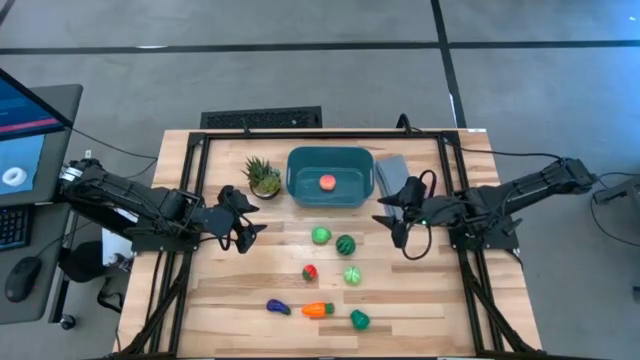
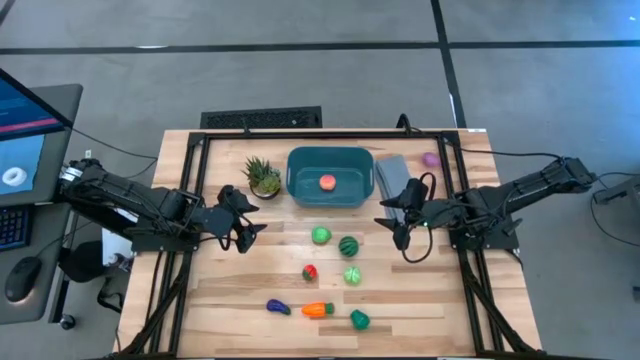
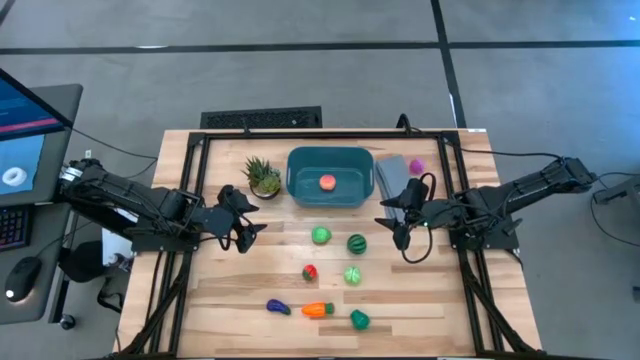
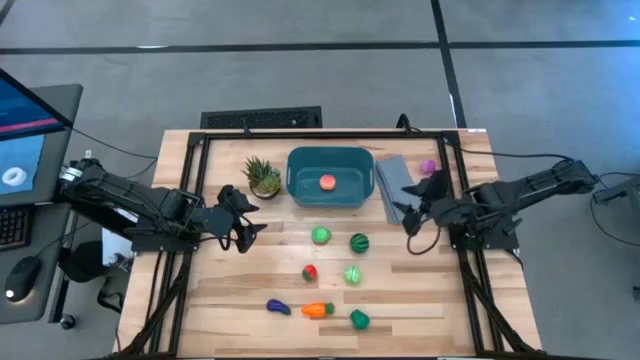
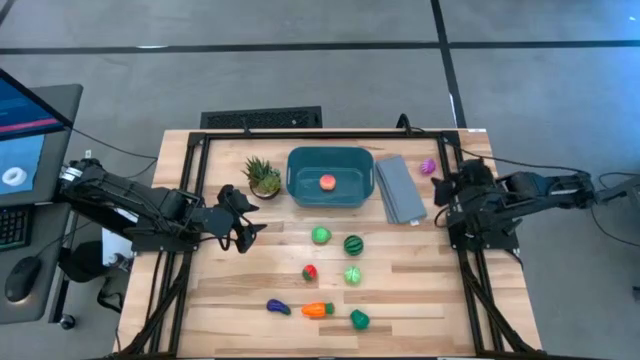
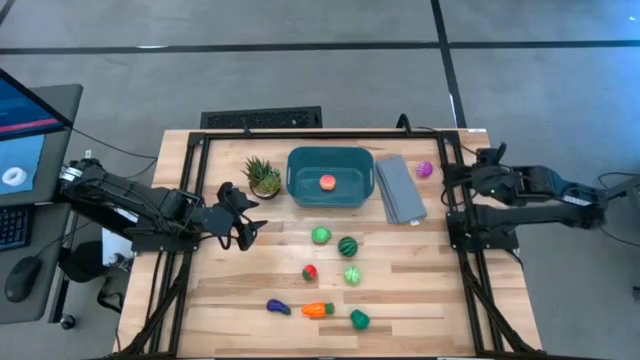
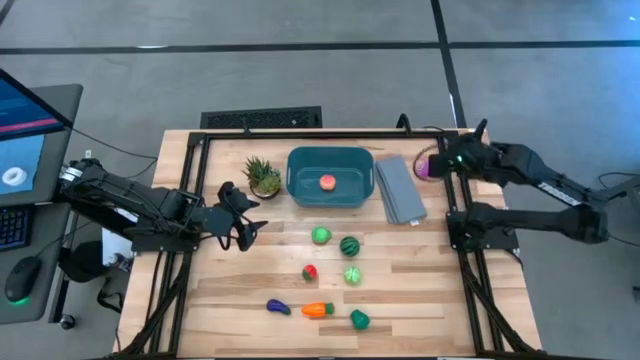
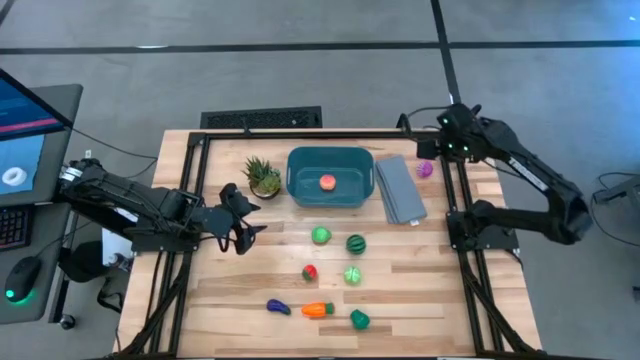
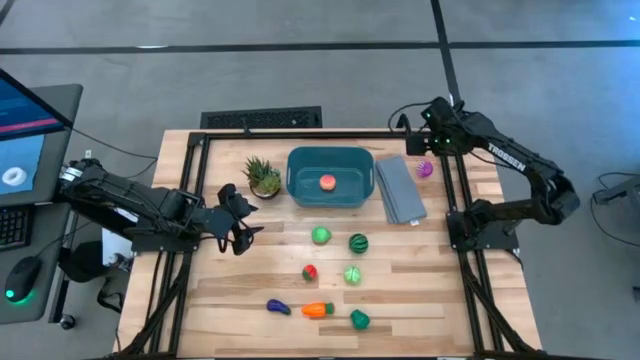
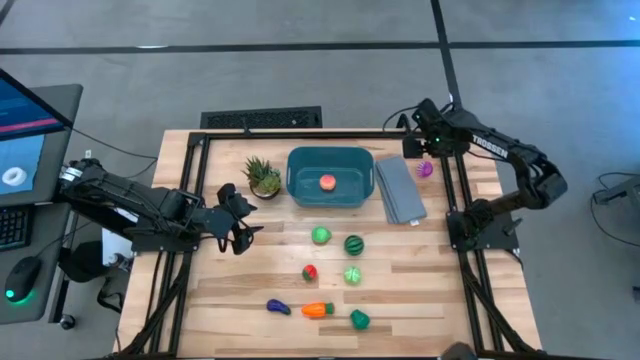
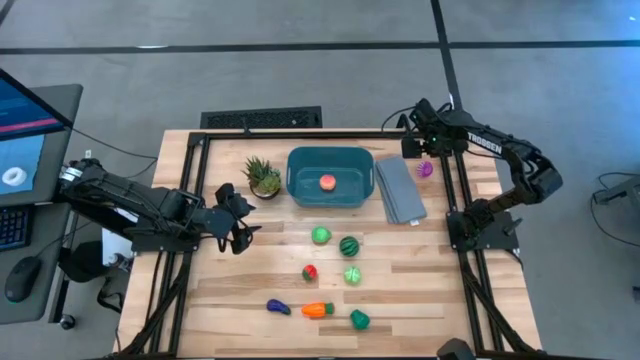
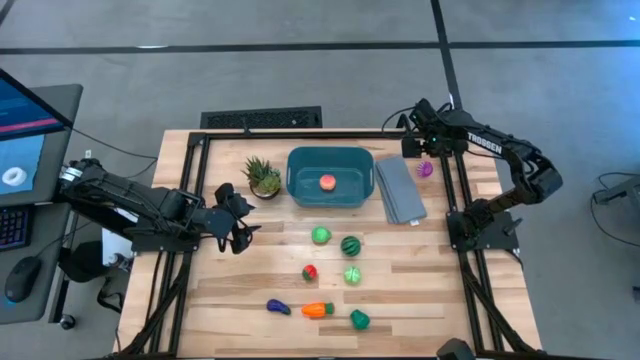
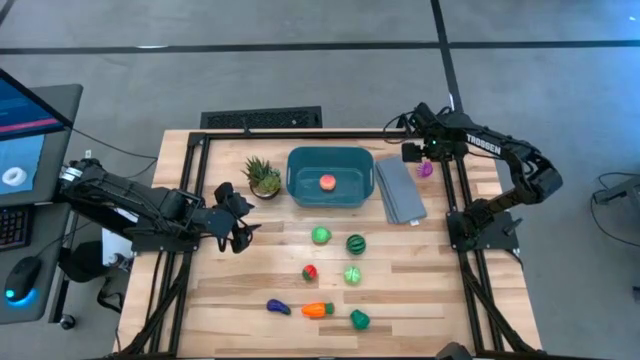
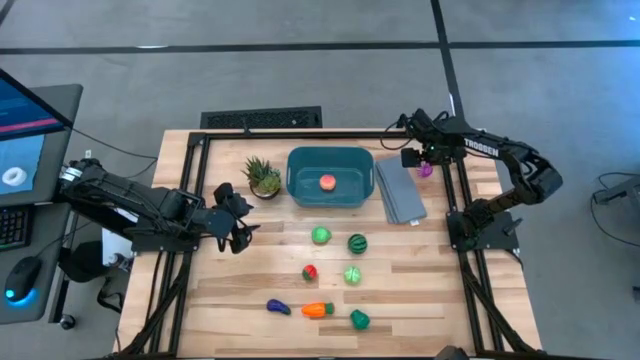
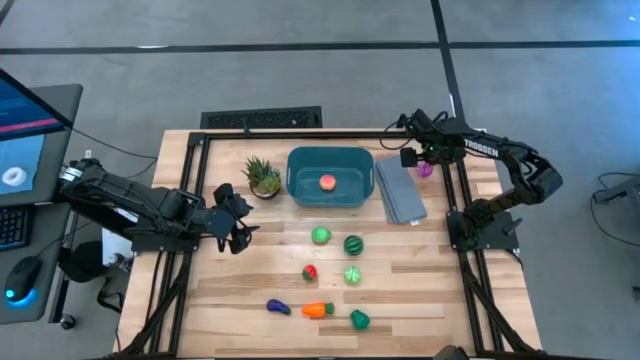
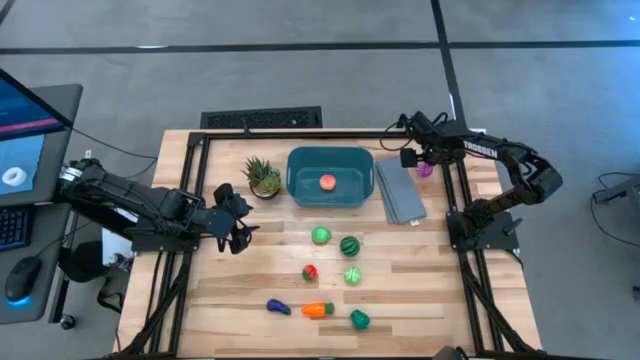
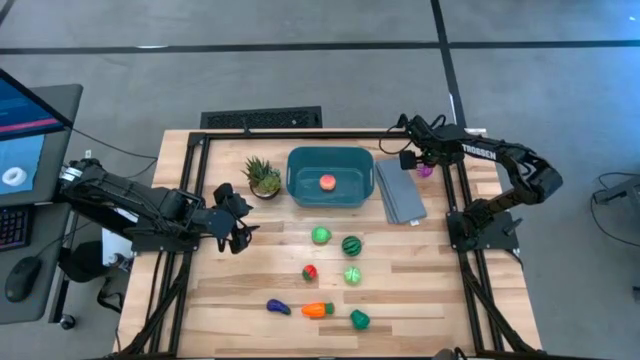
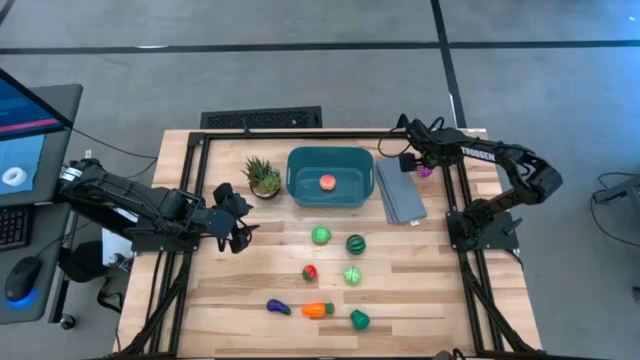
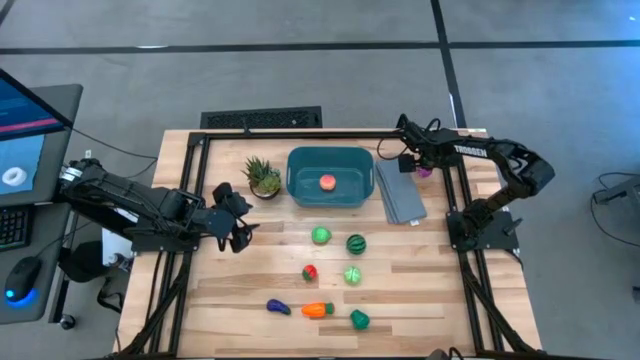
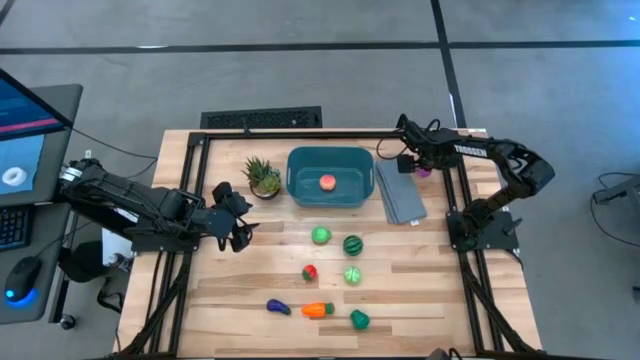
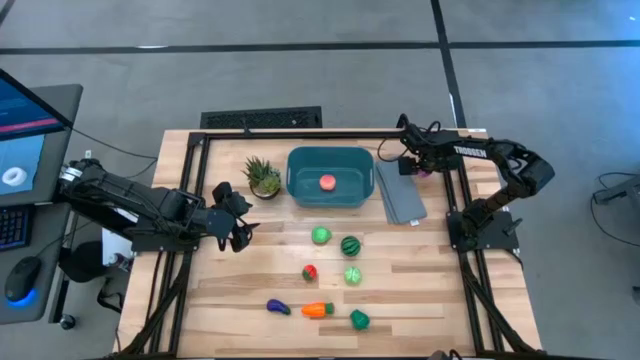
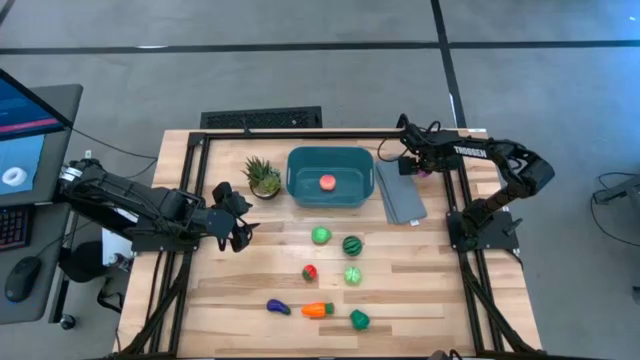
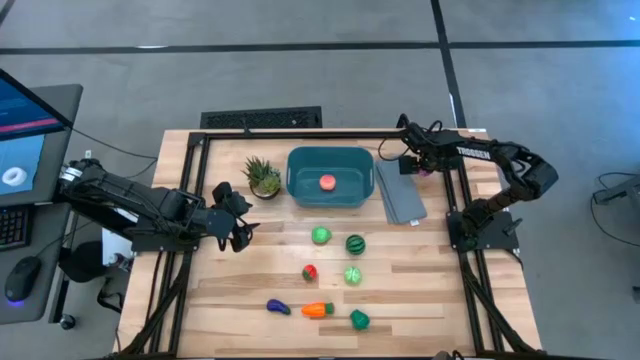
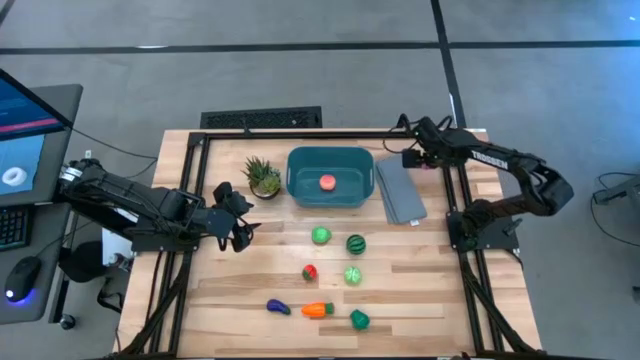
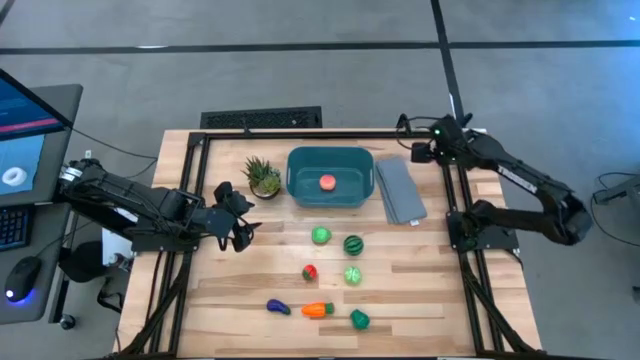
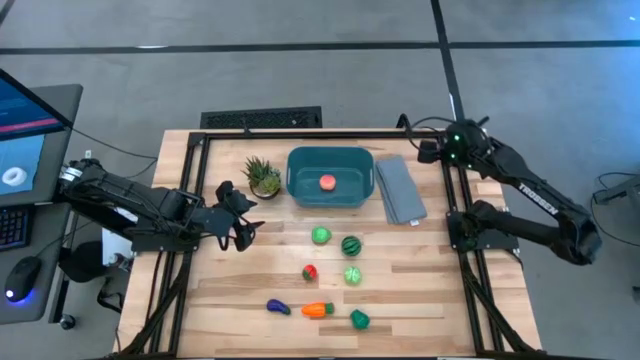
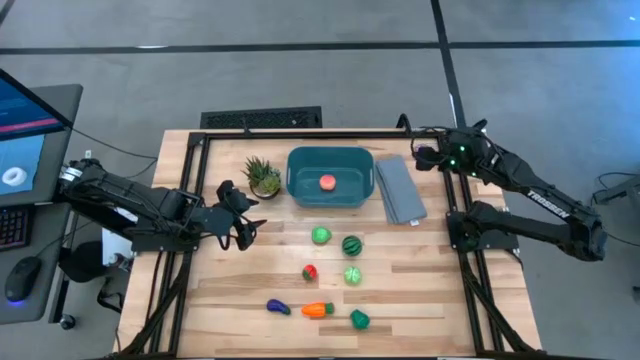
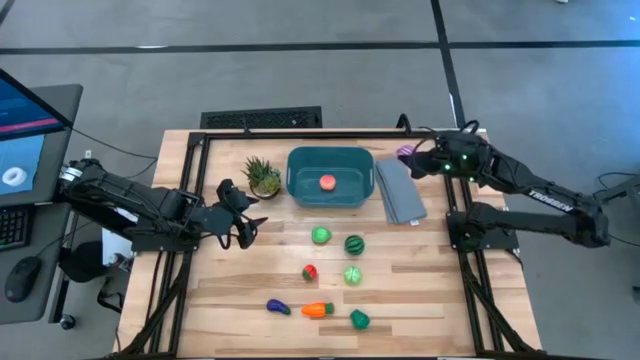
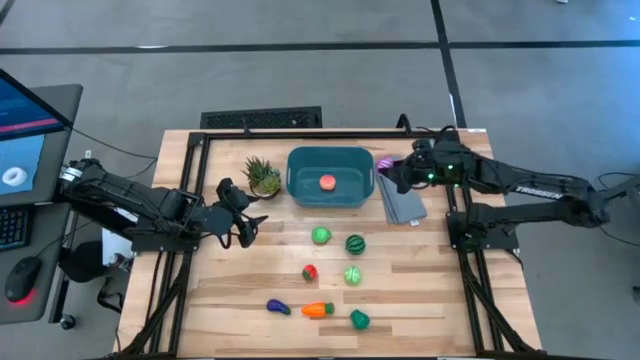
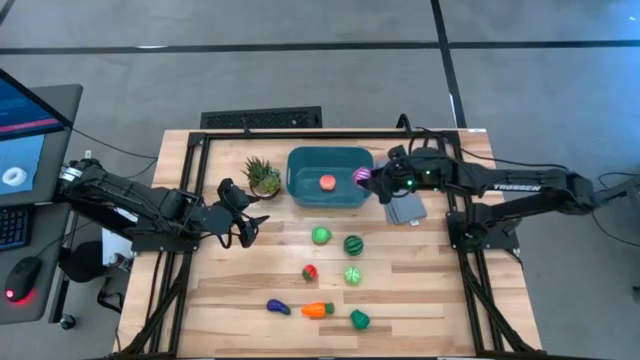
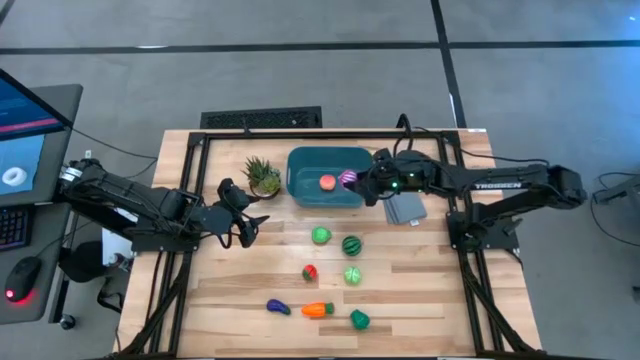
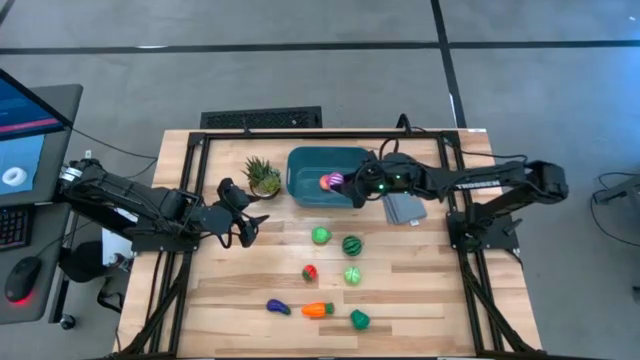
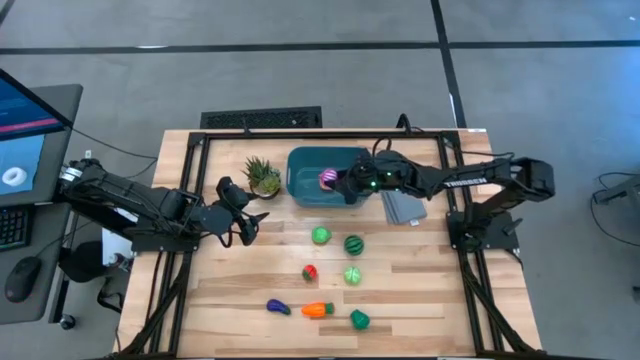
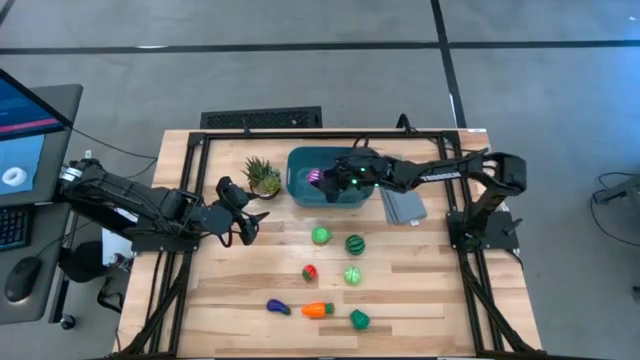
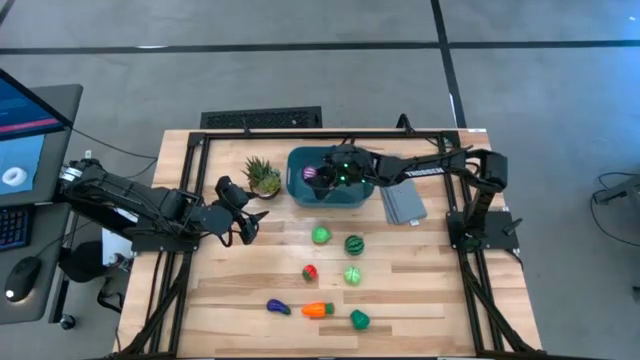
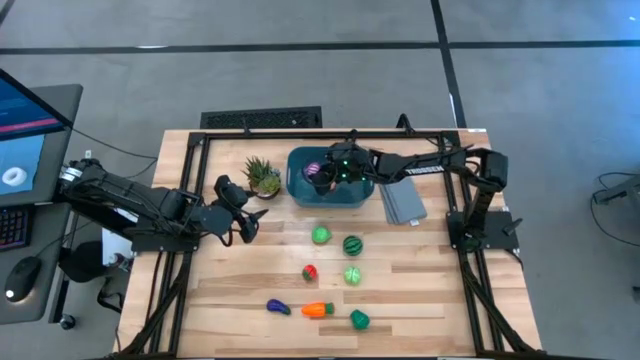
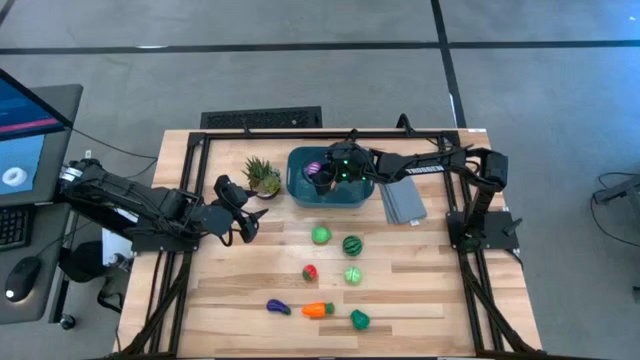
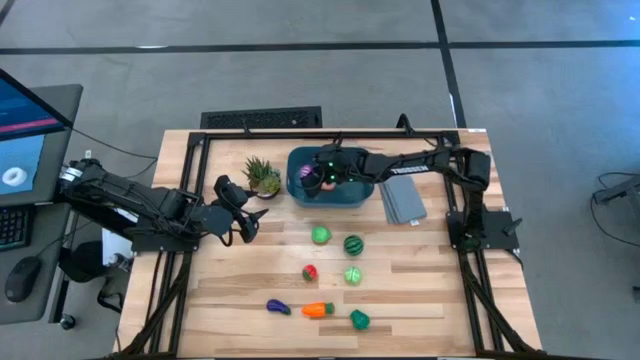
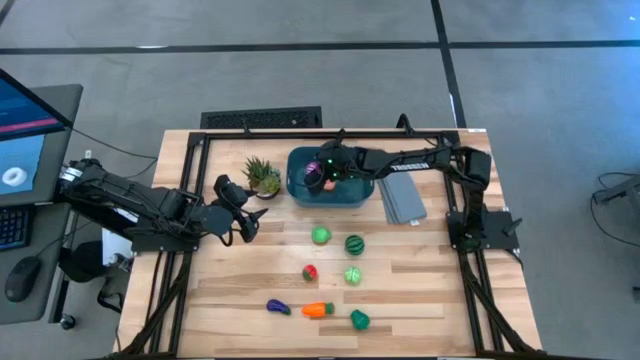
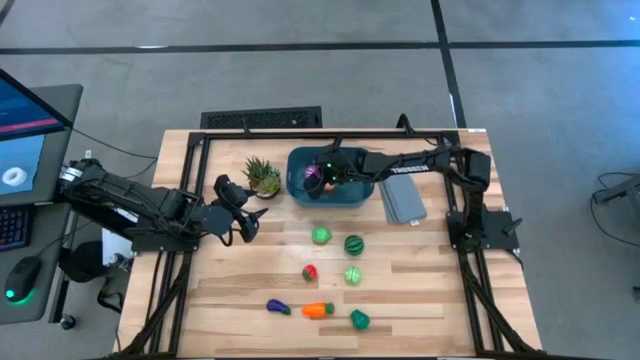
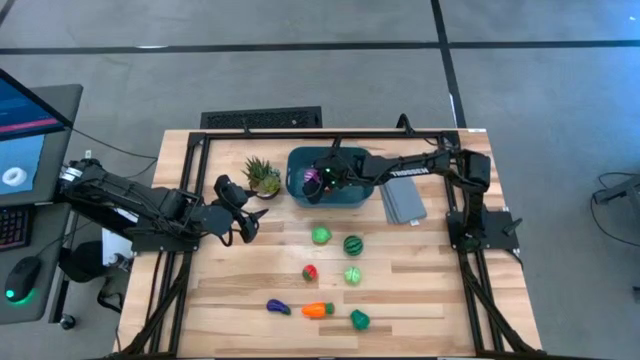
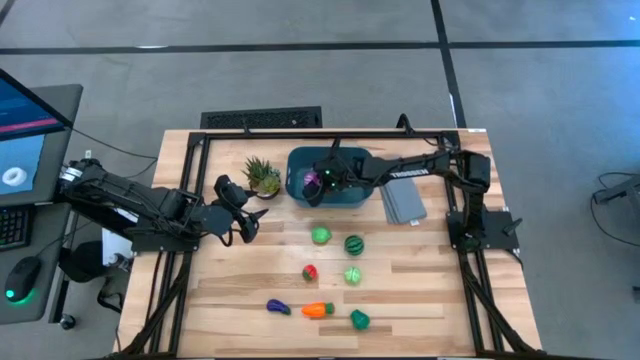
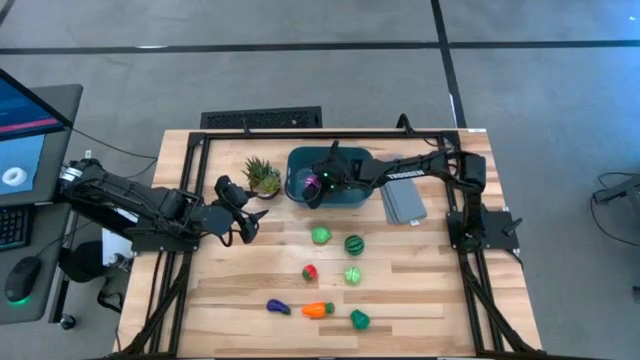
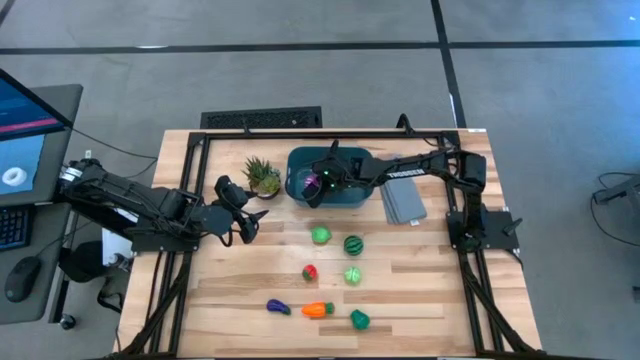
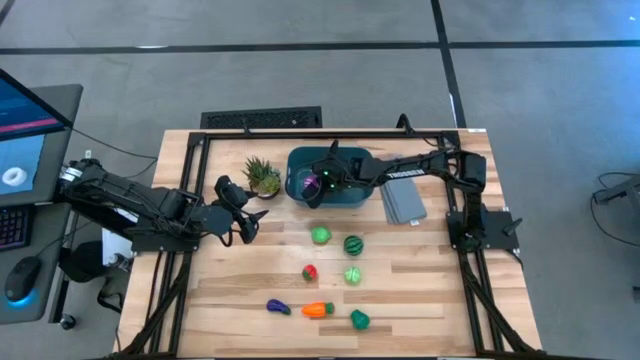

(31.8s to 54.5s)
Task: Pick and placing Produce into tupperware
Put the onion into the blue bin
